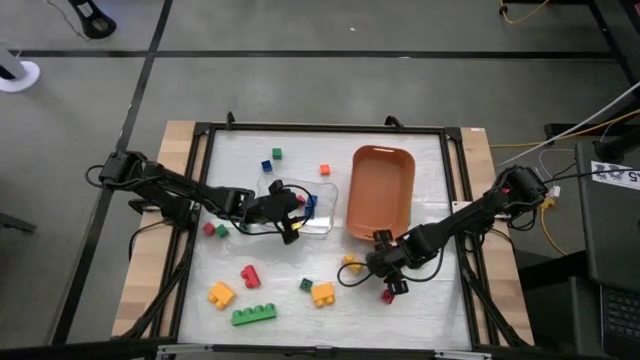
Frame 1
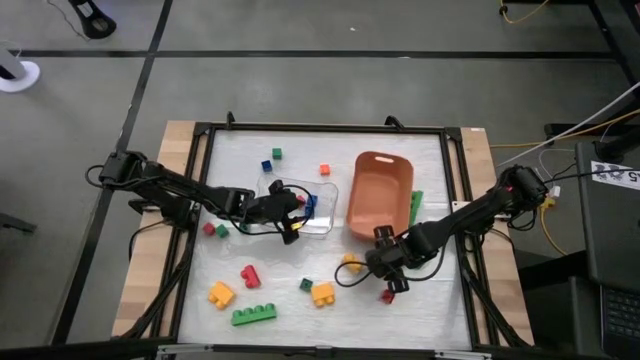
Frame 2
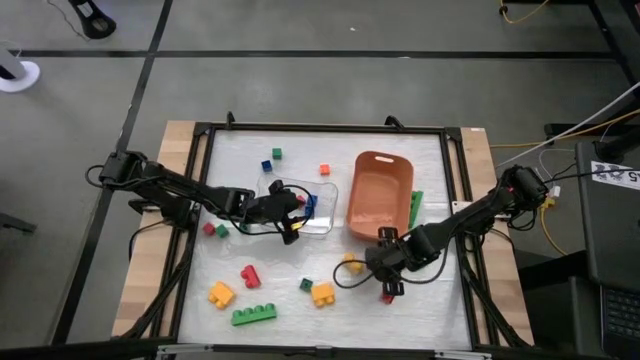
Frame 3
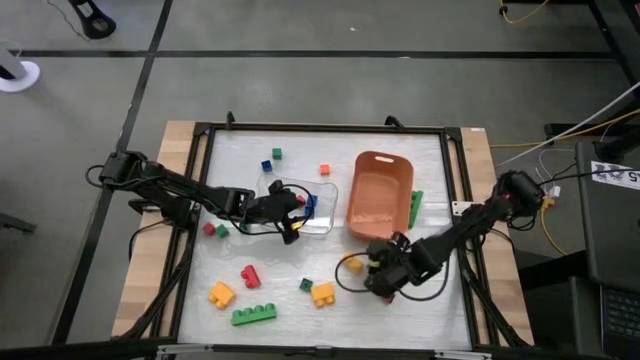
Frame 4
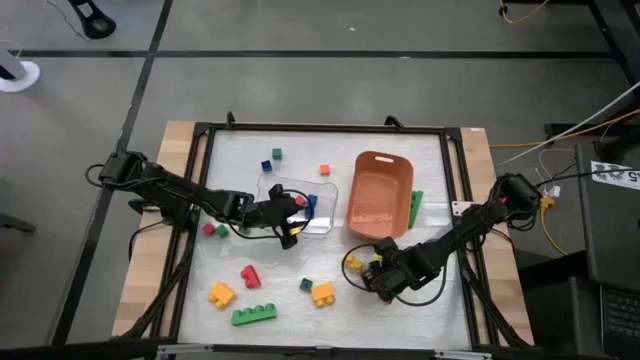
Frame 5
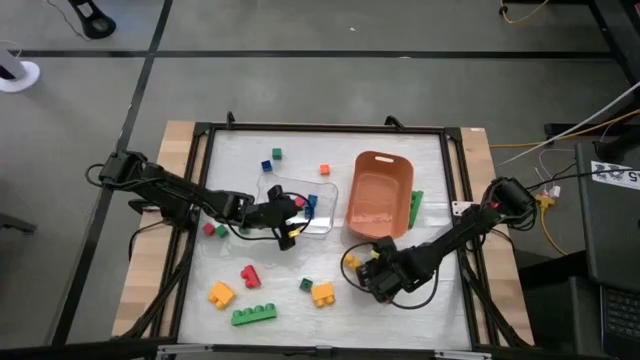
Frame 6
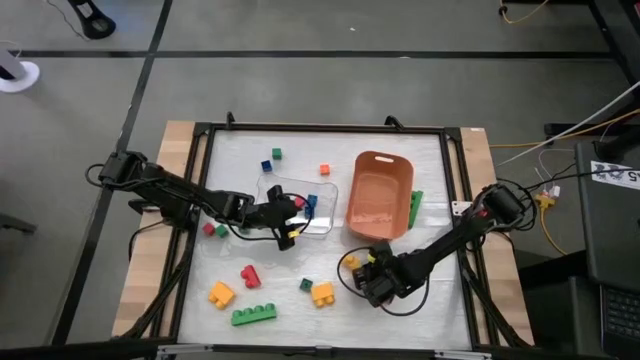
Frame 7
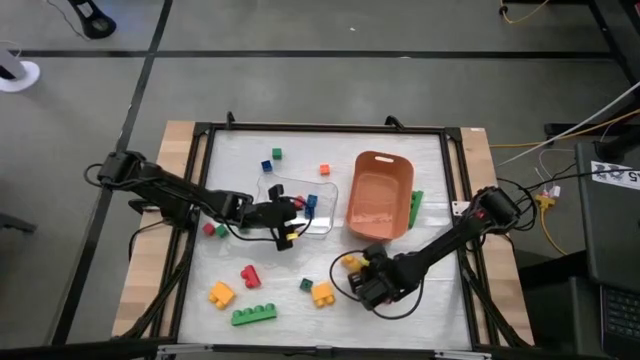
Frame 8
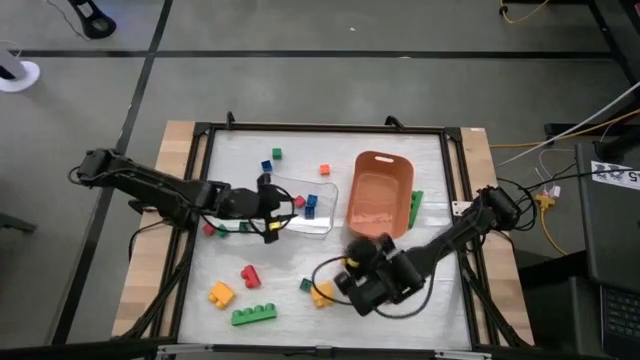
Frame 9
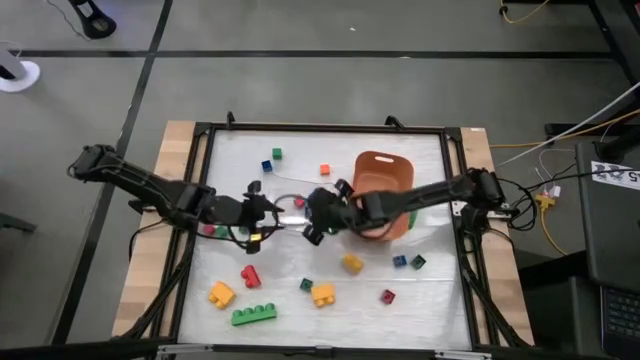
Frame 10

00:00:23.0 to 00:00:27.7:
Task: Sort blocks by size
Put the small green game piece into the transparent bin

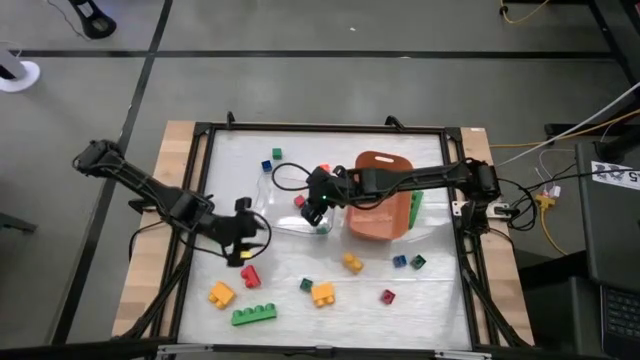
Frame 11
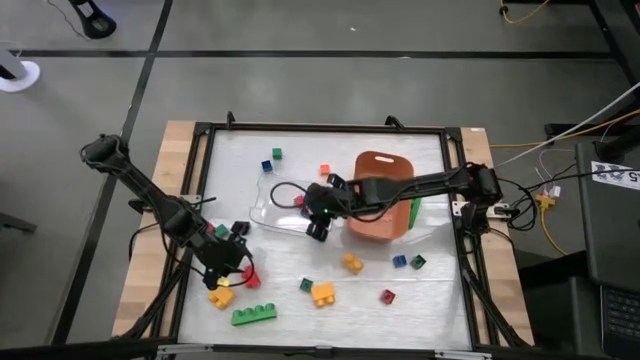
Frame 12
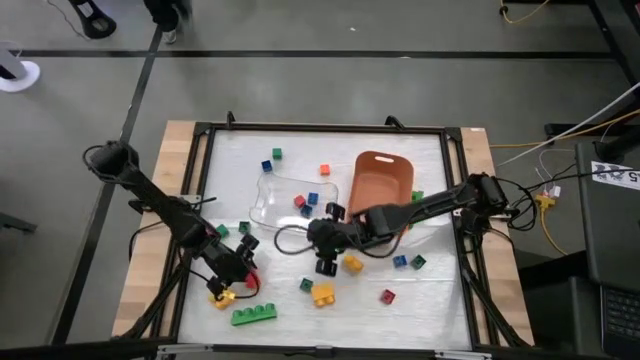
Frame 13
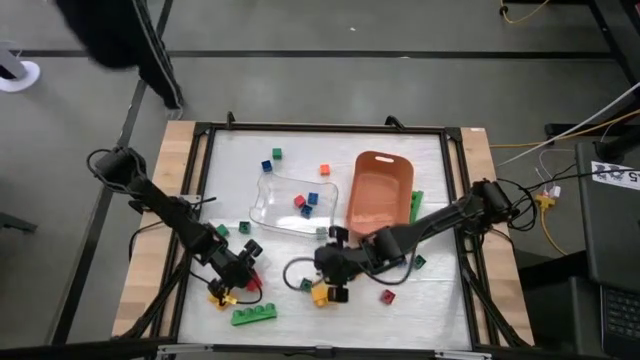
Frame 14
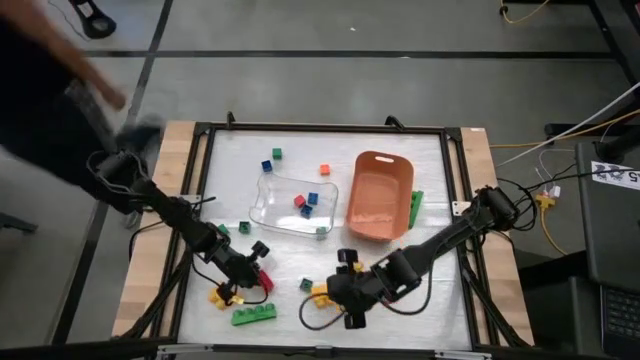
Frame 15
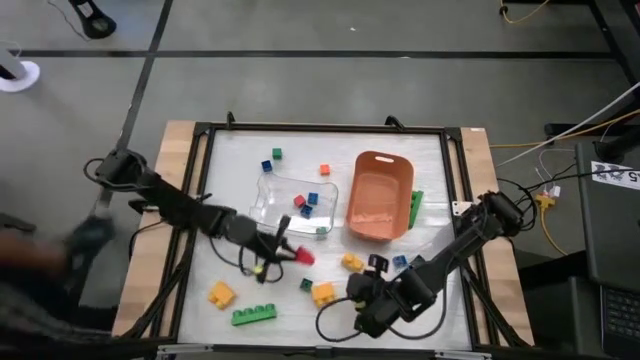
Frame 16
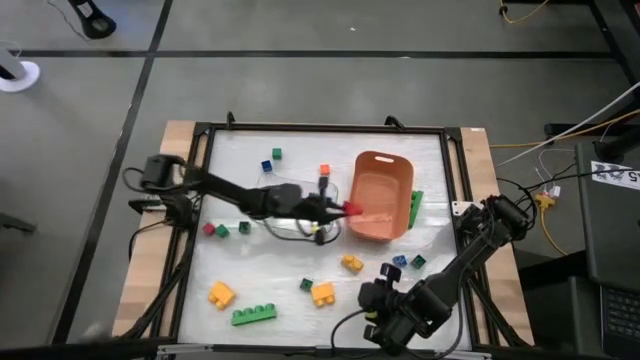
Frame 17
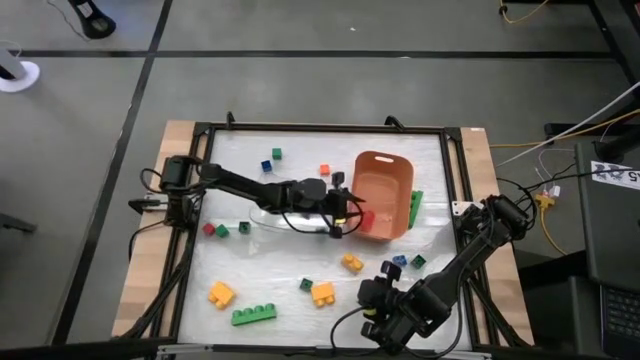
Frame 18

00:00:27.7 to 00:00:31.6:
Put the big red game piece into the orange bin

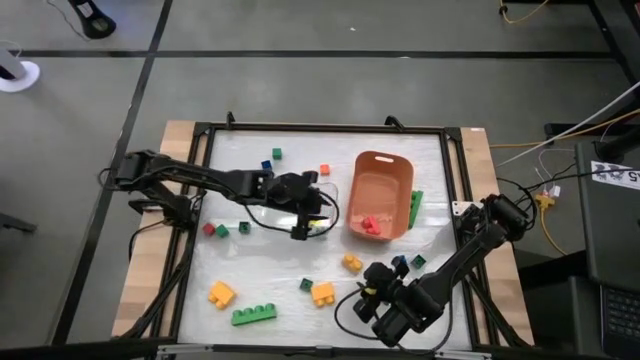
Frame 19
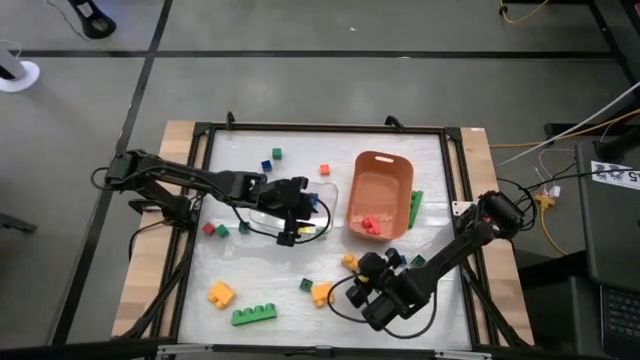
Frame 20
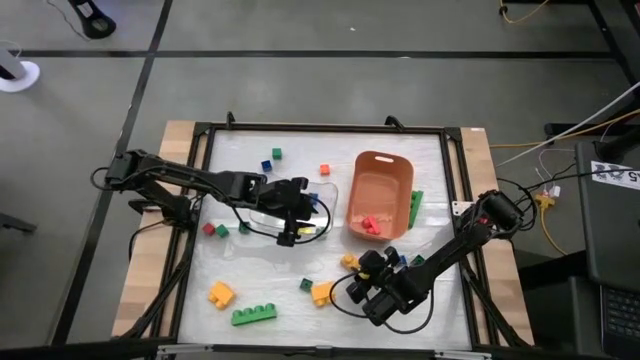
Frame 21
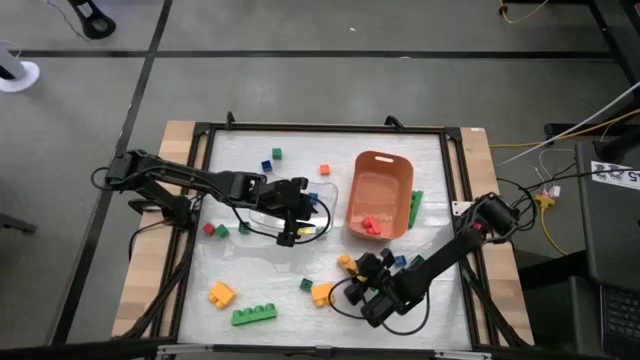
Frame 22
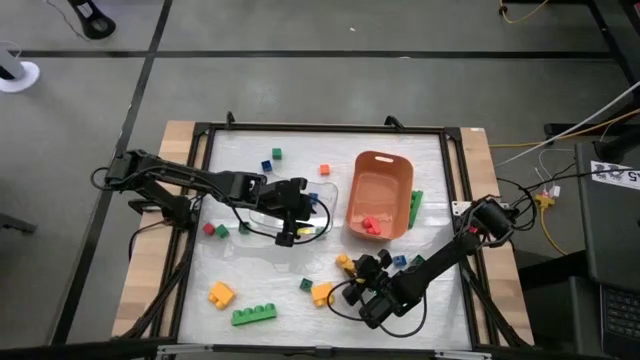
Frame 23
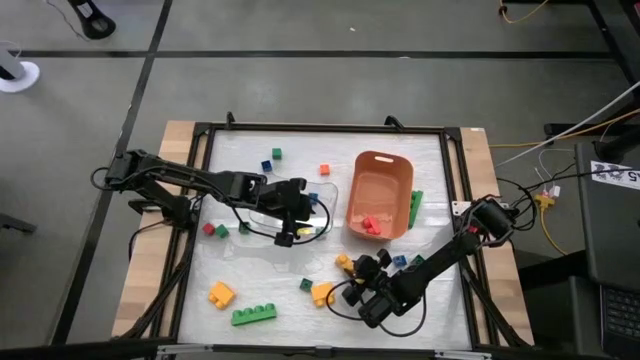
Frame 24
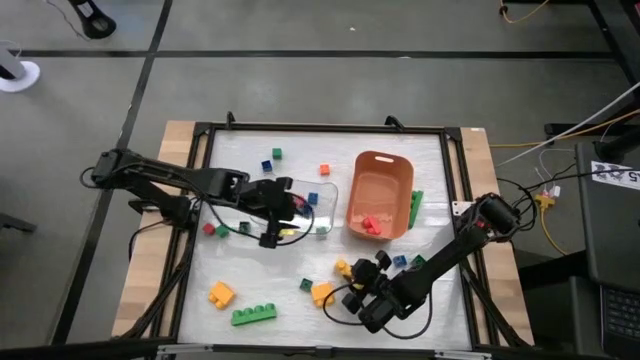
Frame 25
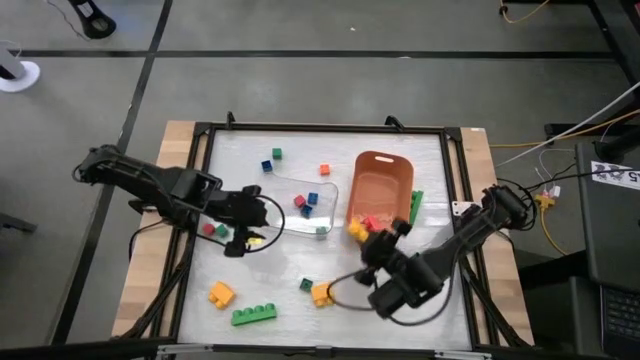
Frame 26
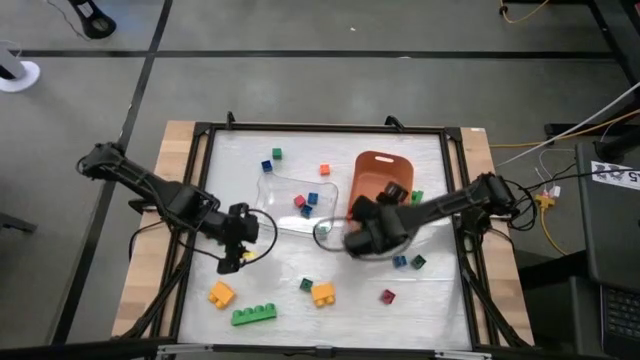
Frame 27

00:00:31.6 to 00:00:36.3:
Put the big yellow game piece into the orange bin

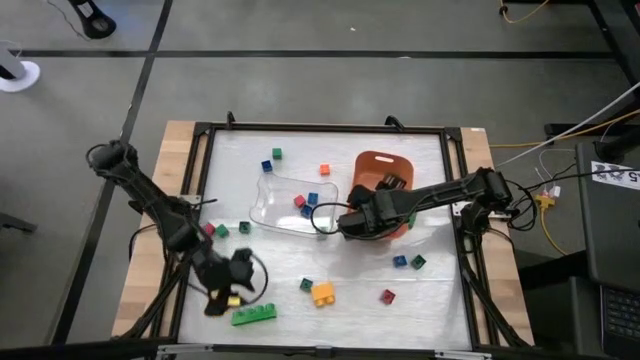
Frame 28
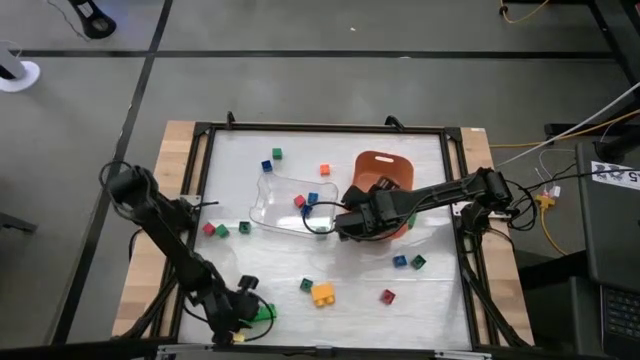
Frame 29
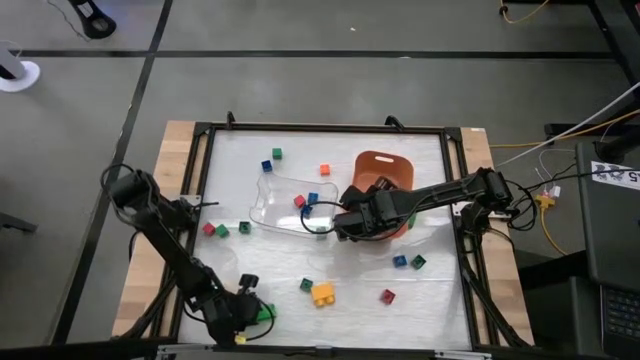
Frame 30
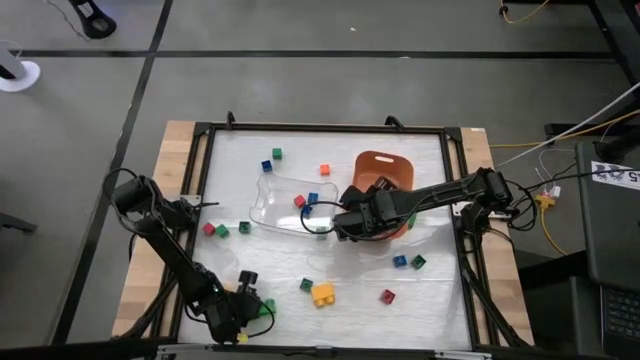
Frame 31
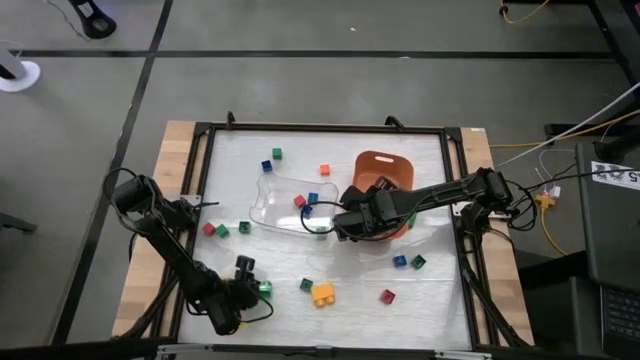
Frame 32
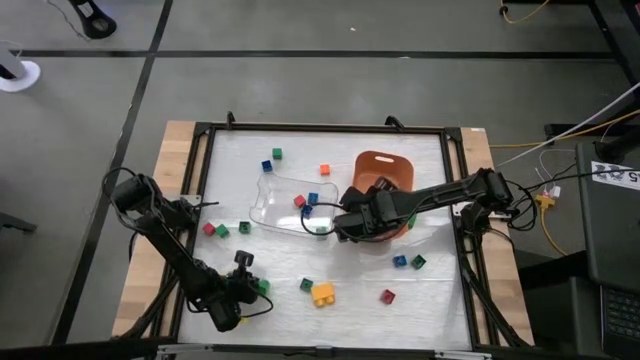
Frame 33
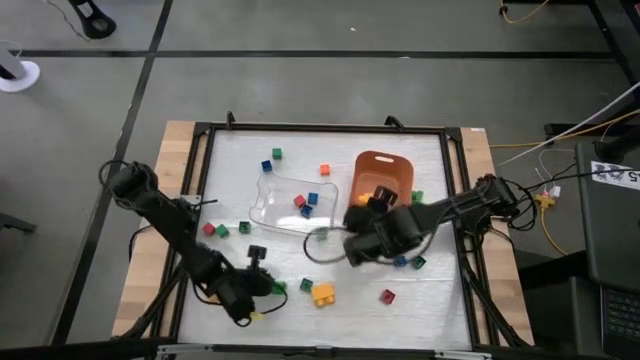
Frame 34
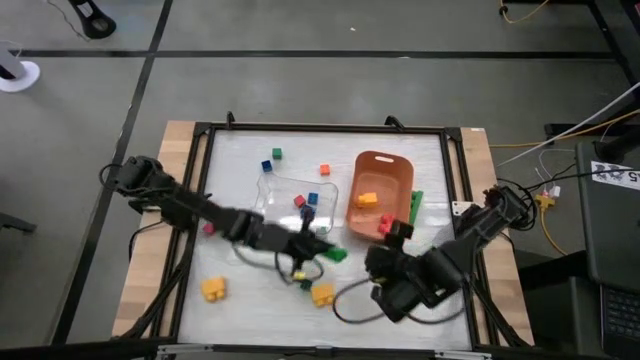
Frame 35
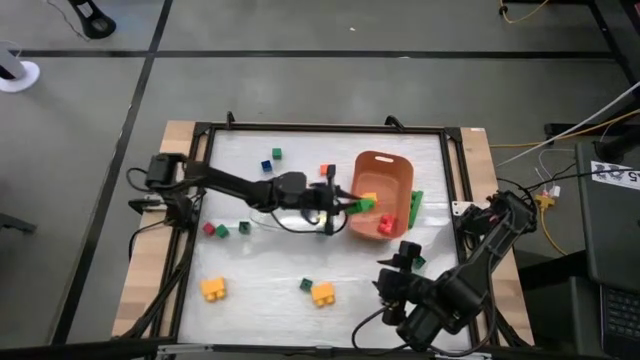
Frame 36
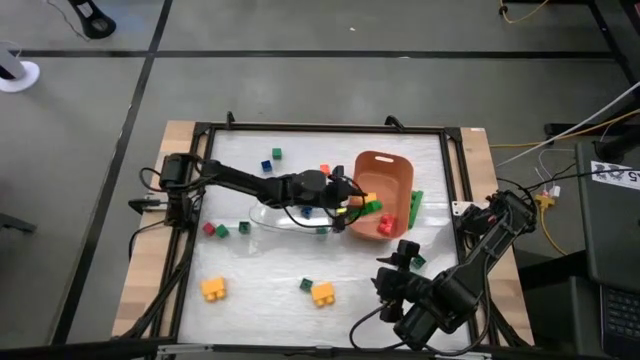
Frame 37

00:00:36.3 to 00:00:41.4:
Put the big green game piece into the orange bin

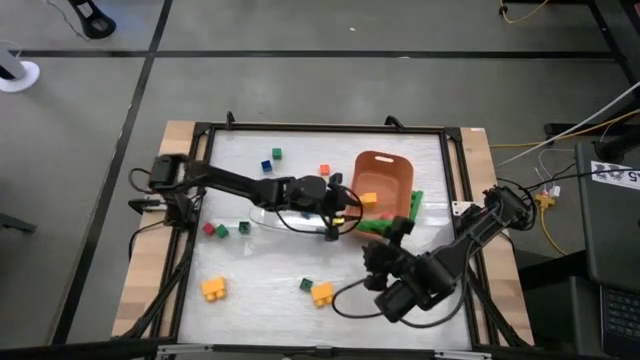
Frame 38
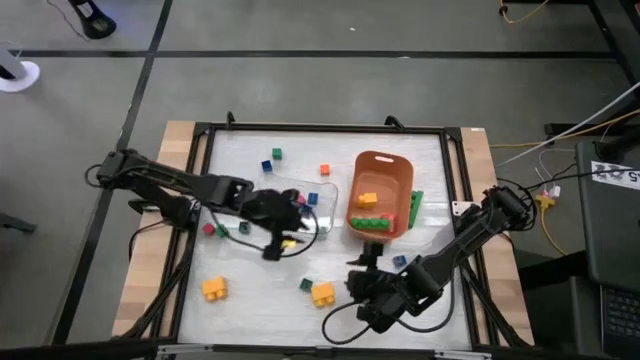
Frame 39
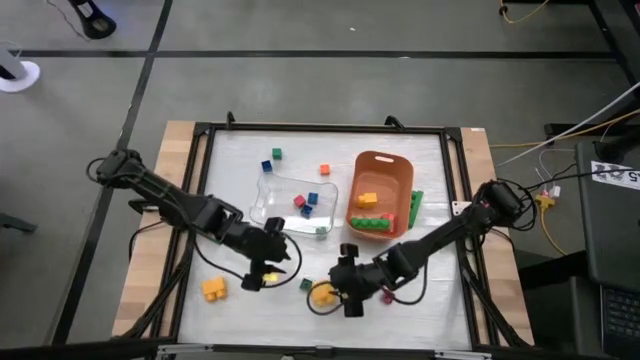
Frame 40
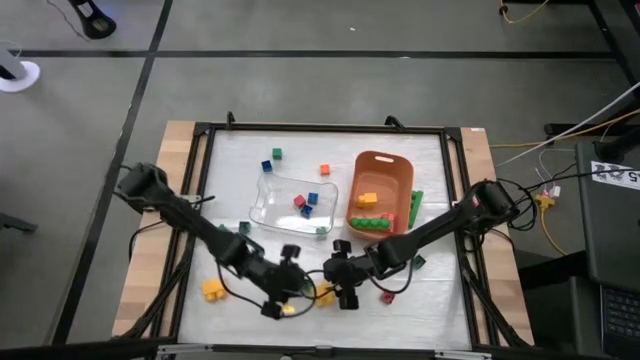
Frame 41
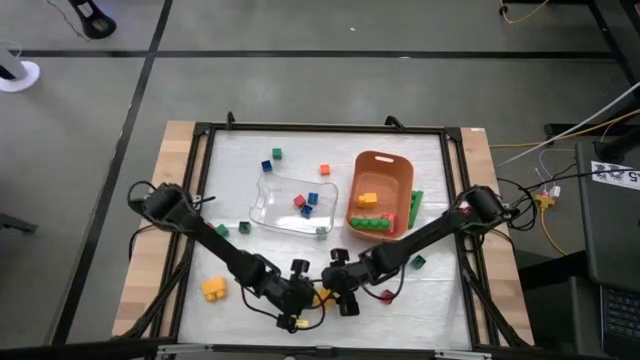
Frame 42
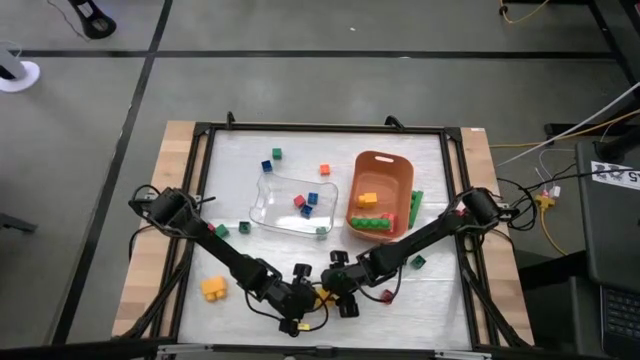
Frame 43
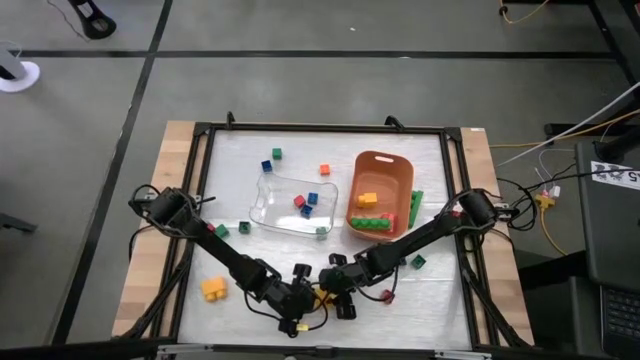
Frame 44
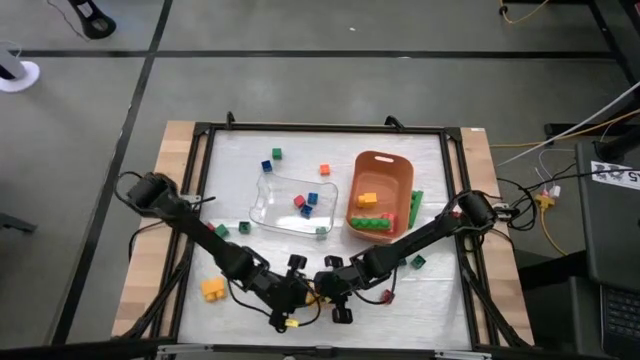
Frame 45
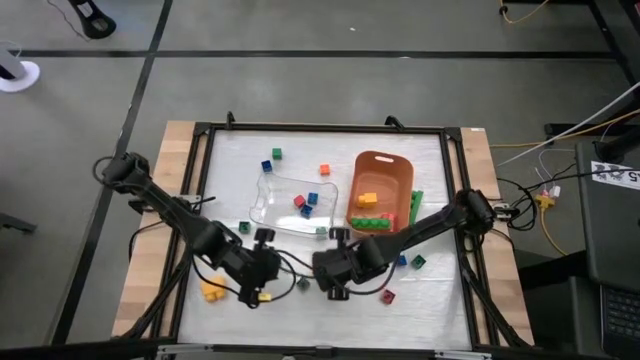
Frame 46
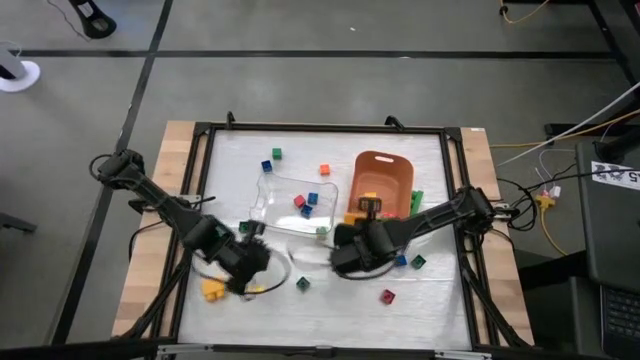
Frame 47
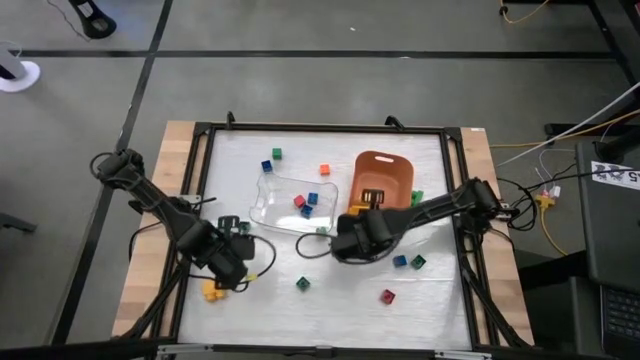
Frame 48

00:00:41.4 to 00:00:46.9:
Put the big yellow game piece into the orange bin
